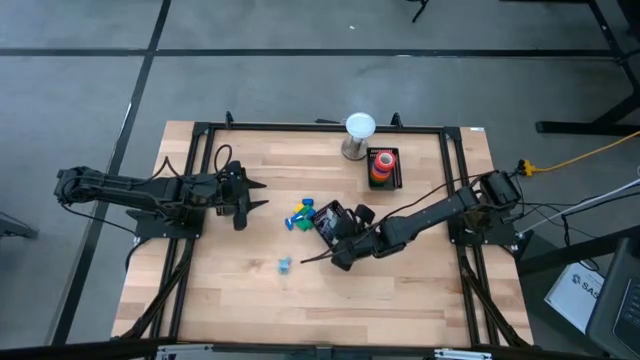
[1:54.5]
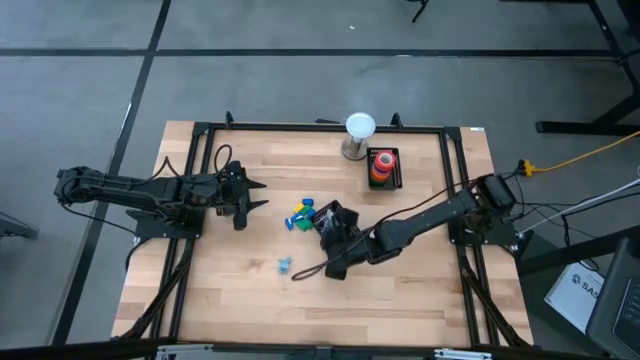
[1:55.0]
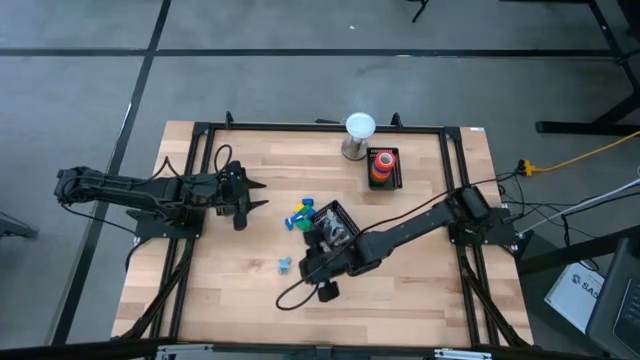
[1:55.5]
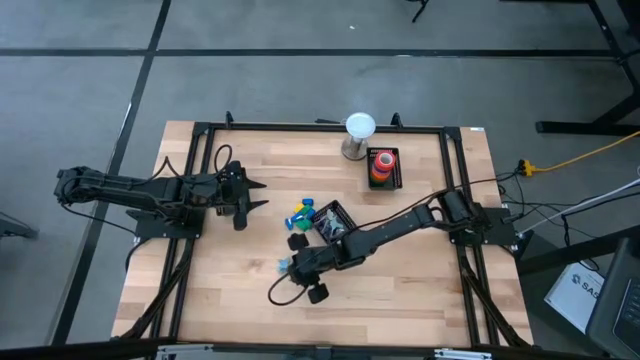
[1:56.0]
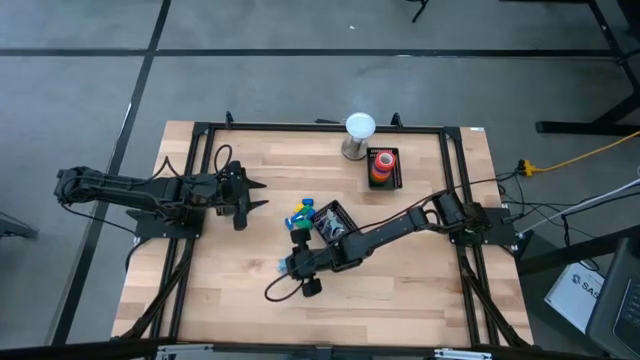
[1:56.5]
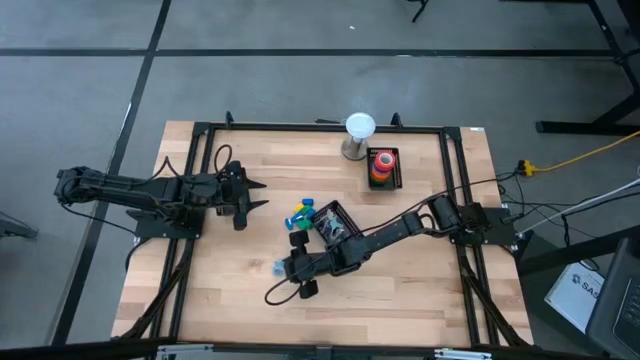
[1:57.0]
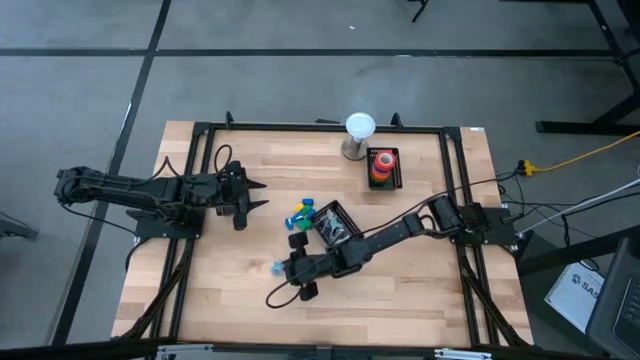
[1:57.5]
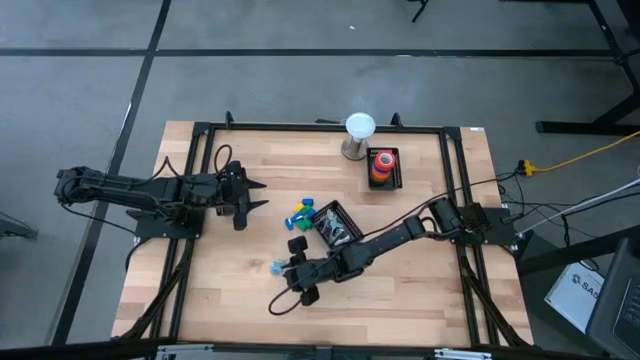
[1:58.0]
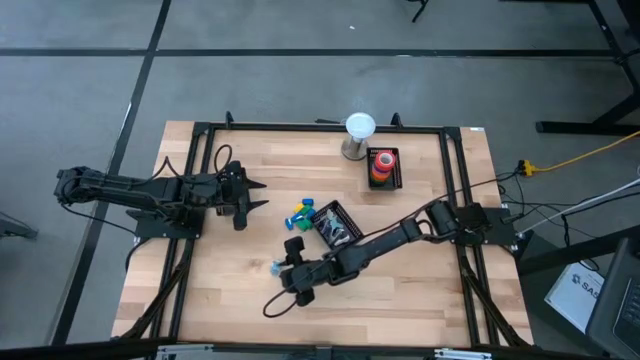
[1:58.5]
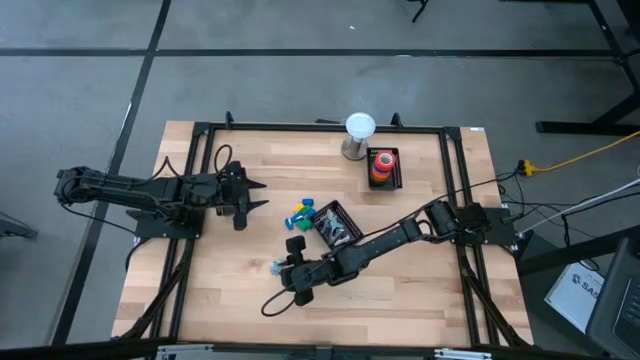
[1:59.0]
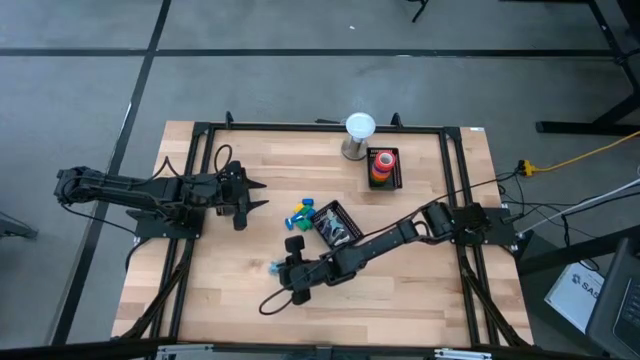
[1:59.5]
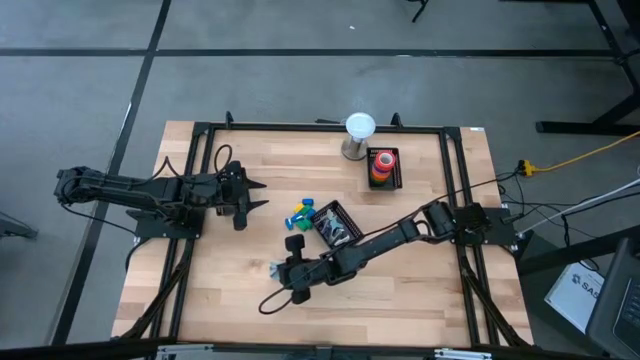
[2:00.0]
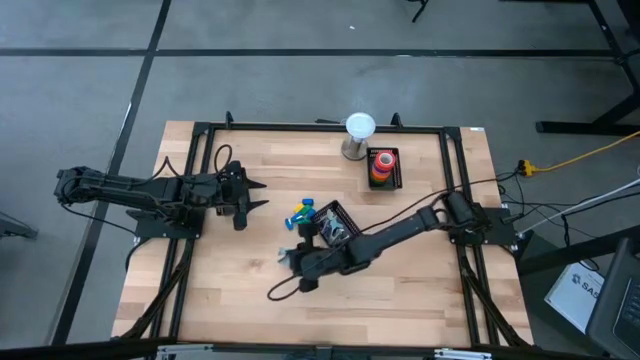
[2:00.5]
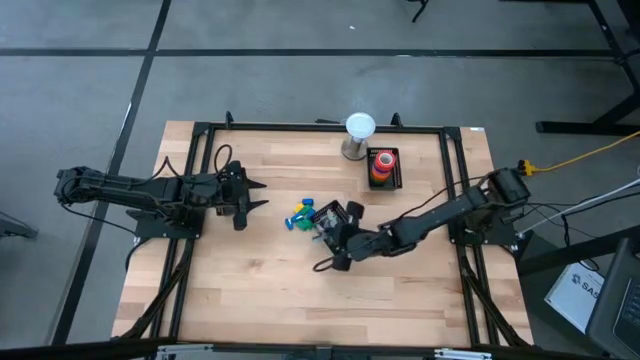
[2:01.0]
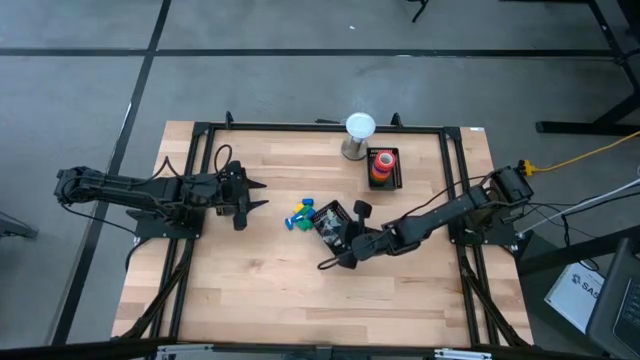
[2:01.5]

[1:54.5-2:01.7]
Task: Pick and place Stapler, Stapler remover, tape
Put the light blue staple remover into the center black bin

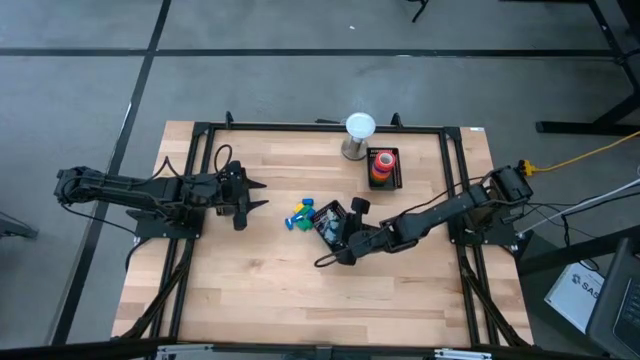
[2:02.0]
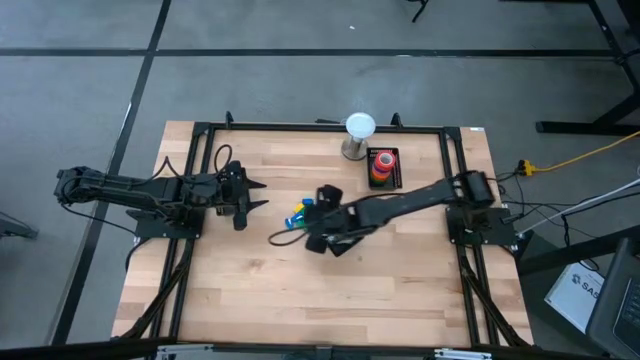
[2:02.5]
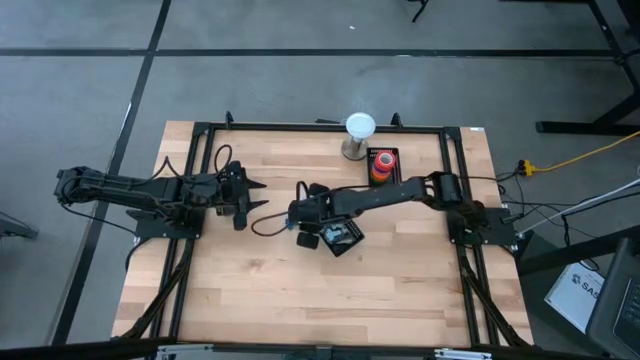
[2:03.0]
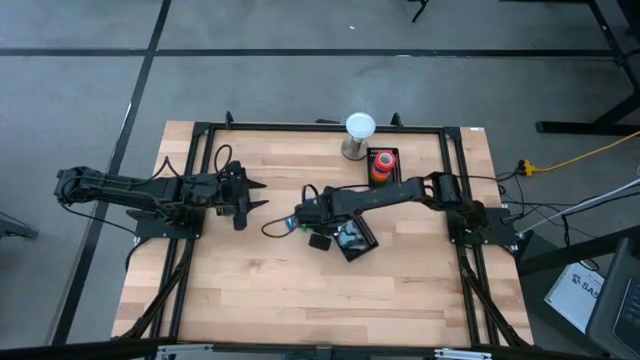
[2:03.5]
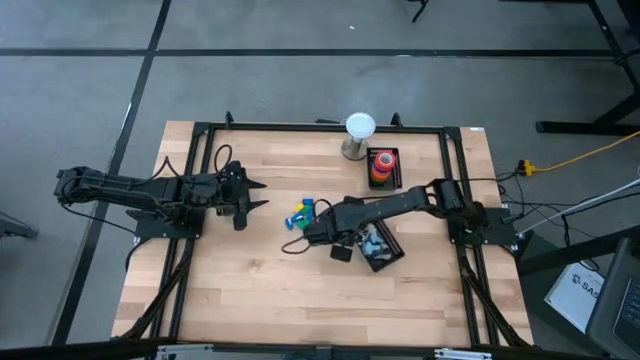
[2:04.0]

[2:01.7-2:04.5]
Move the center black bin to the center right of the table

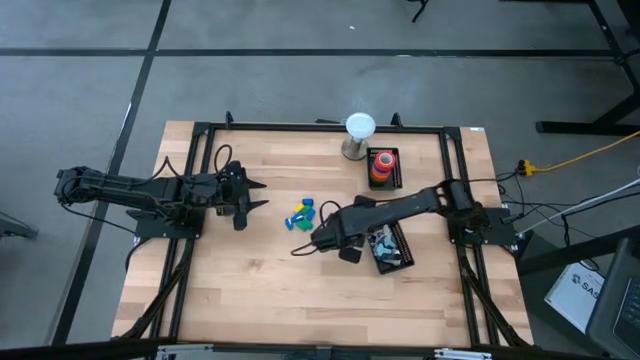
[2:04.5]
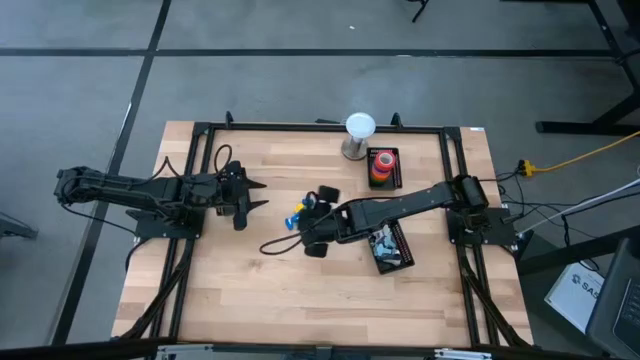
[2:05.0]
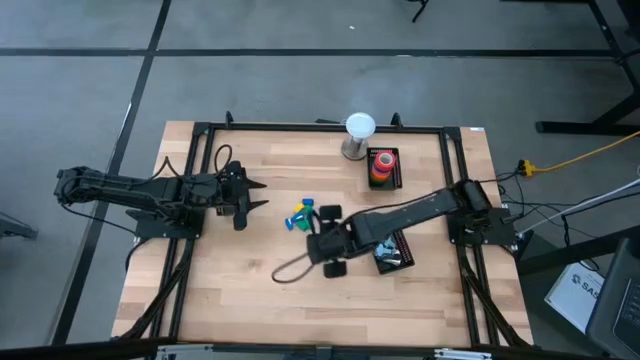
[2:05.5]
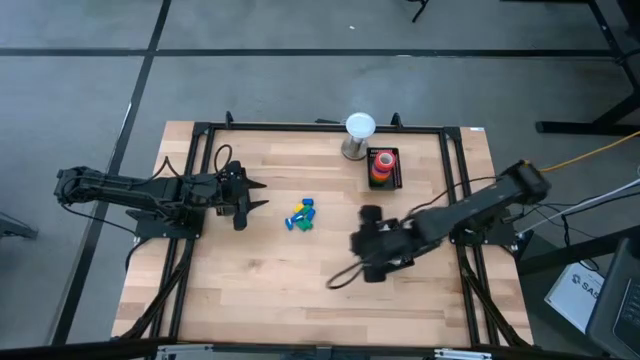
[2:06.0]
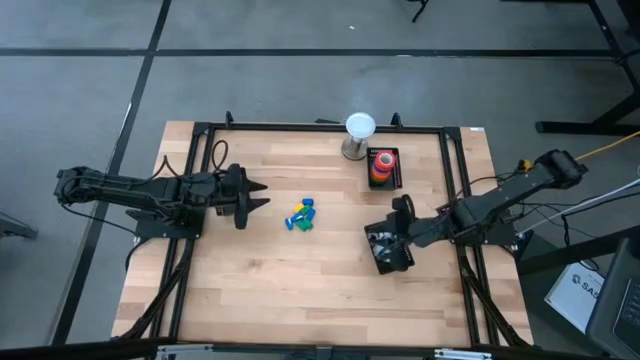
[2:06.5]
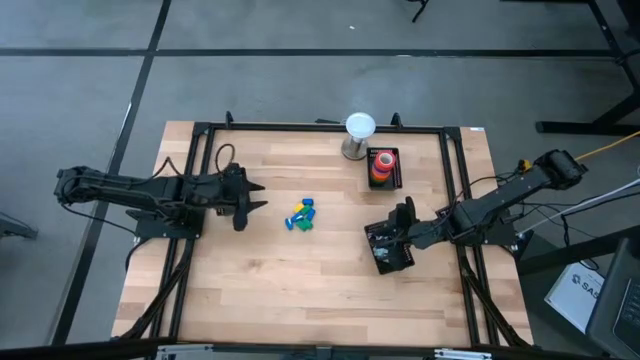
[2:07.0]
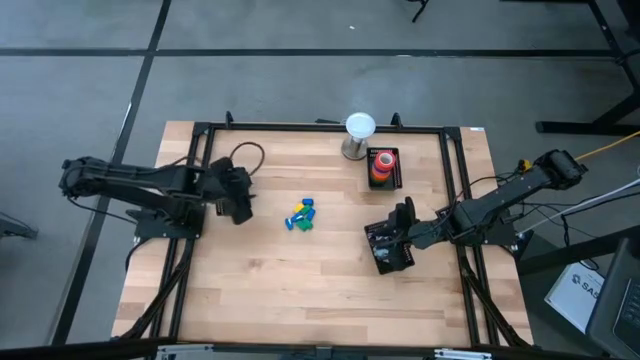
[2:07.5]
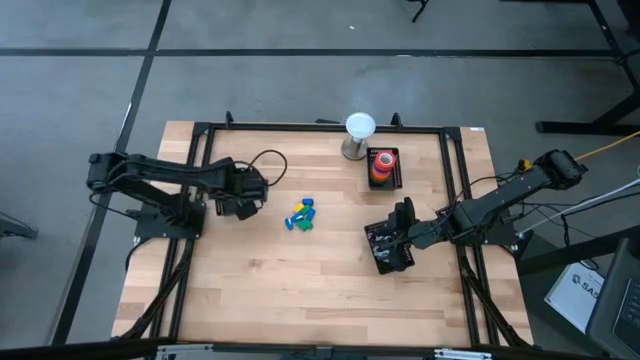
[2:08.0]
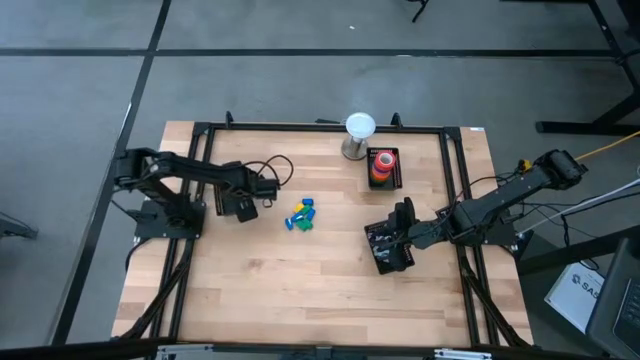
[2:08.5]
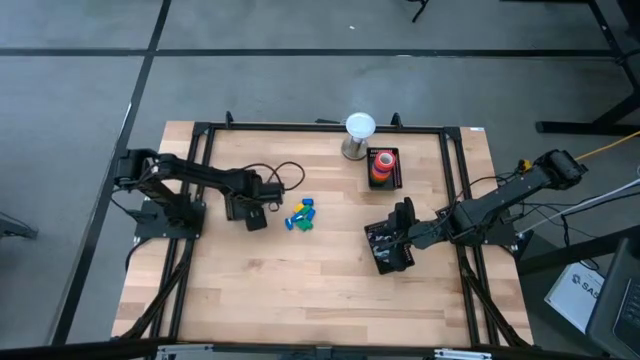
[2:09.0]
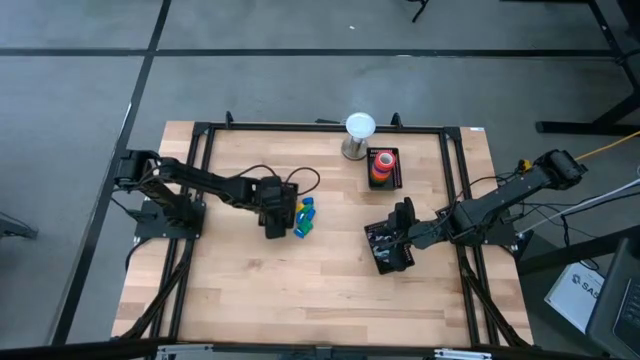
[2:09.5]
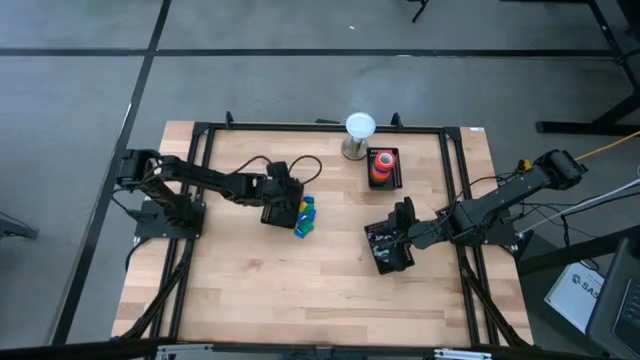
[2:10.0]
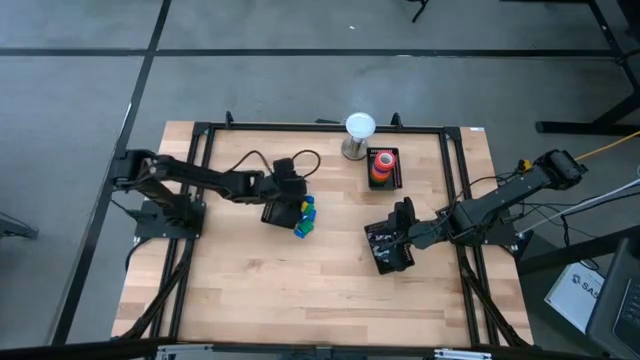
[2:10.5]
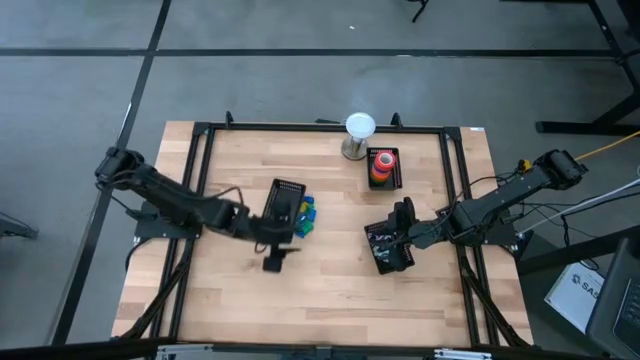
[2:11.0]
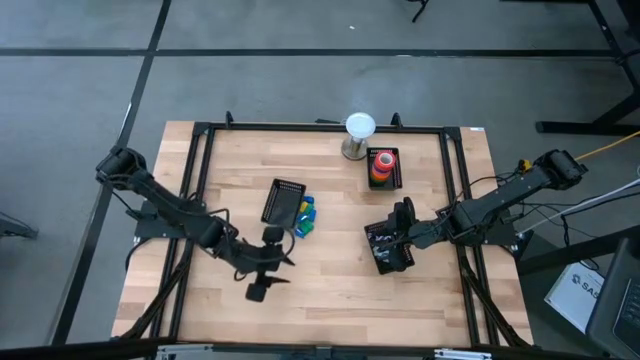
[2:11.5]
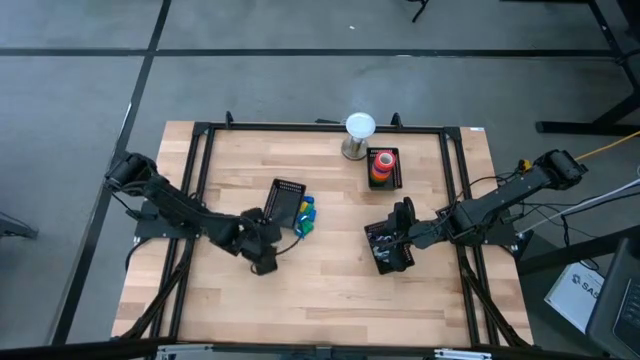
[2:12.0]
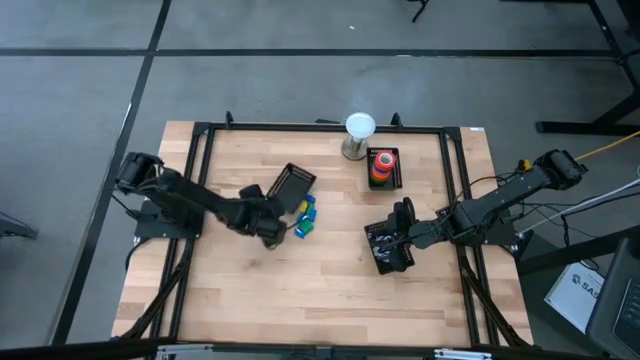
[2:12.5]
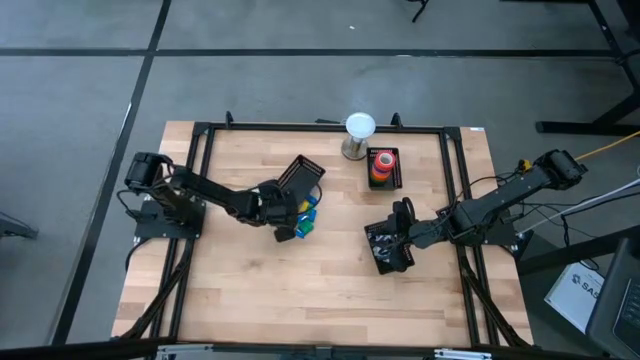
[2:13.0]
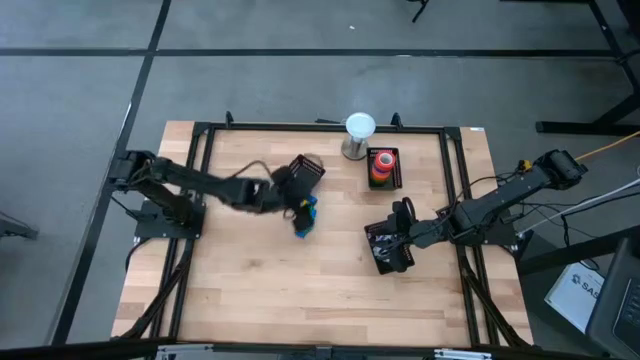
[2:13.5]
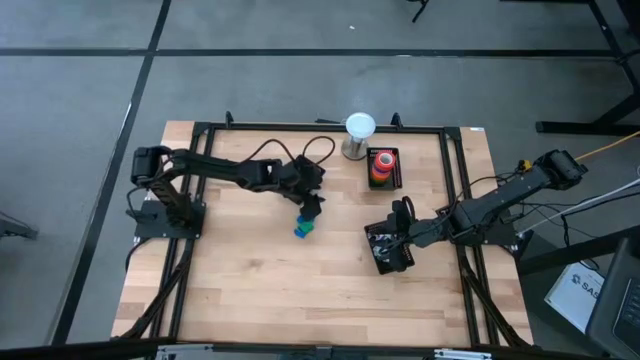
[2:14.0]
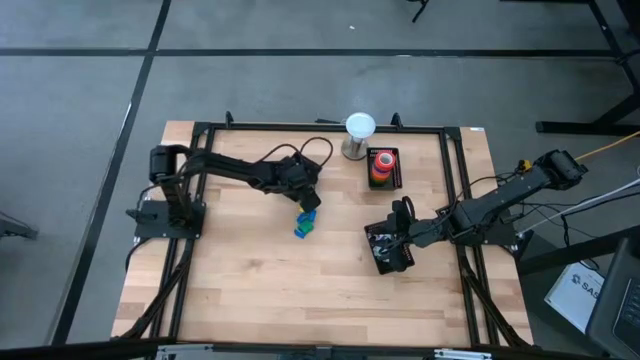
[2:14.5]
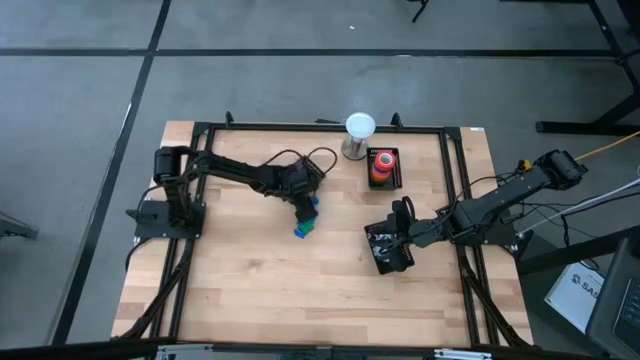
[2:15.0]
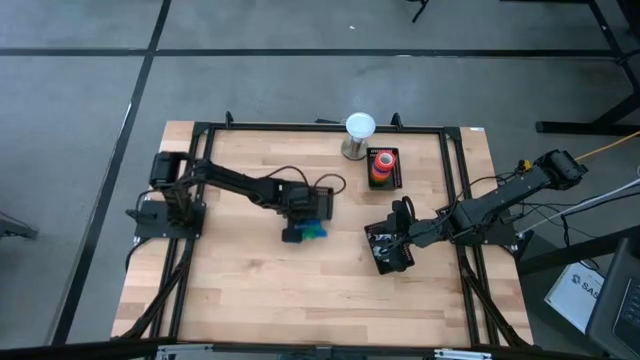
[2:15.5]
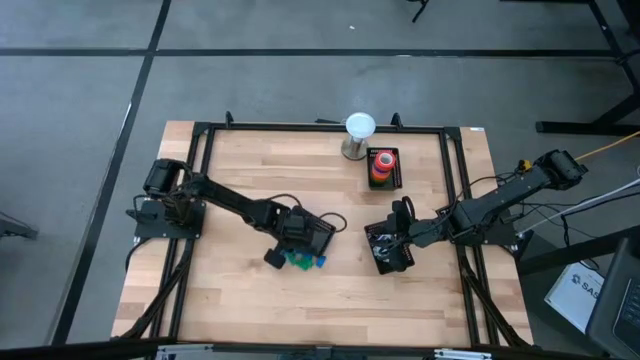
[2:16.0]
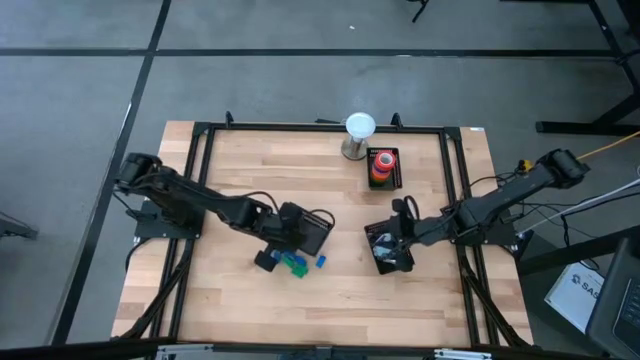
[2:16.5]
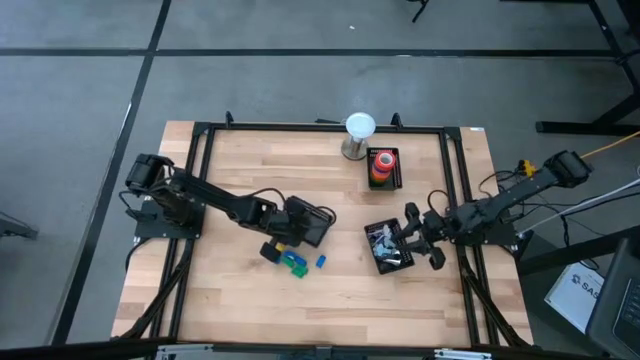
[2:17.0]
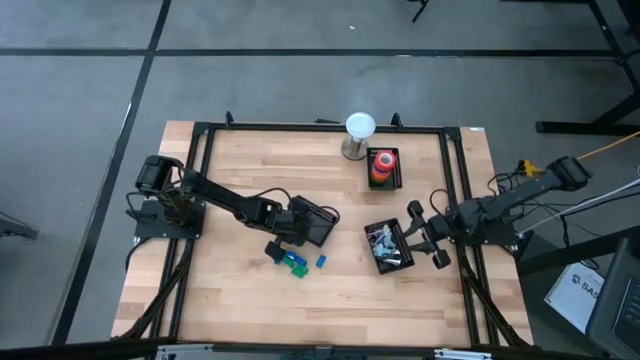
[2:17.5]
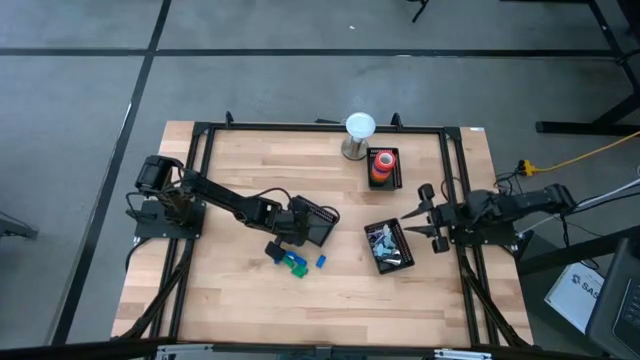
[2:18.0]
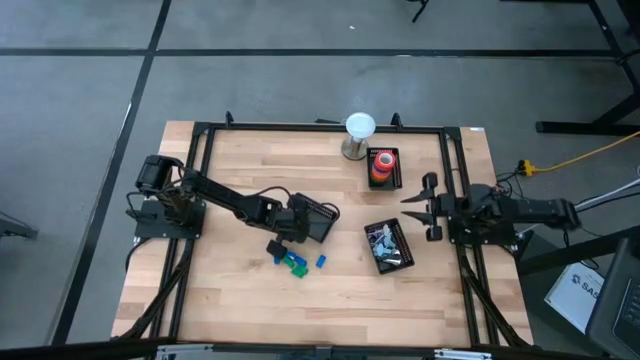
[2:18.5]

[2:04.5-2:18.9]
Move the left black bin to the center of the table
